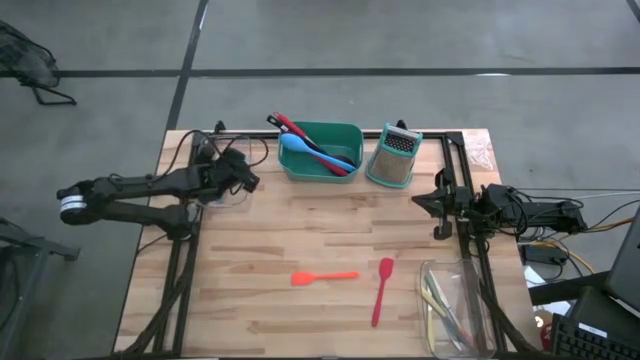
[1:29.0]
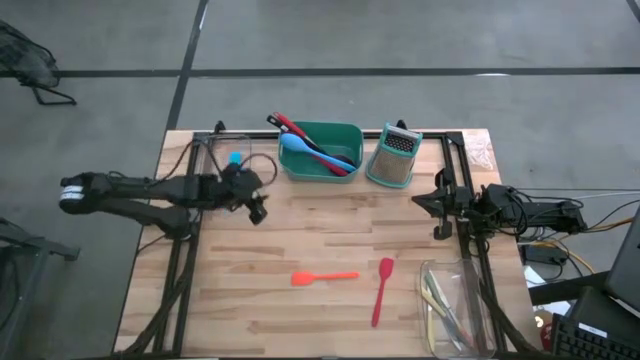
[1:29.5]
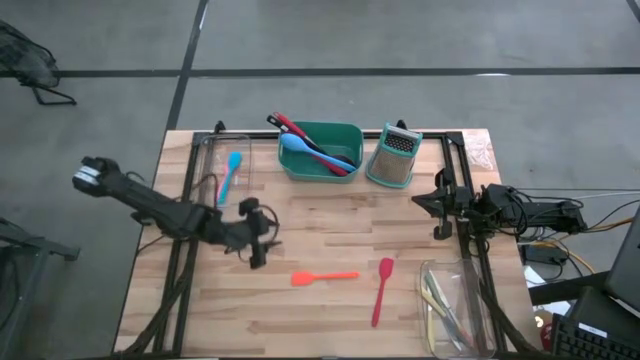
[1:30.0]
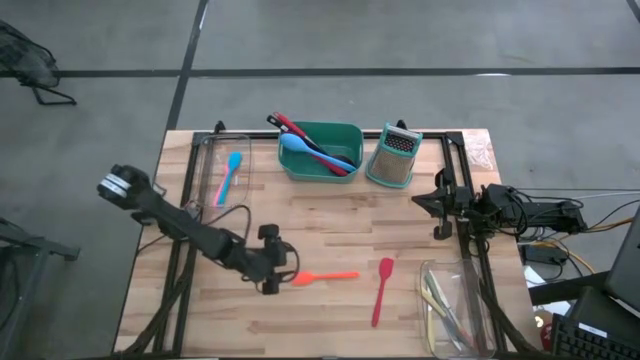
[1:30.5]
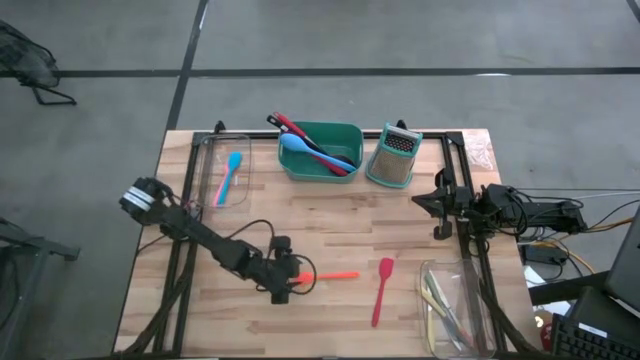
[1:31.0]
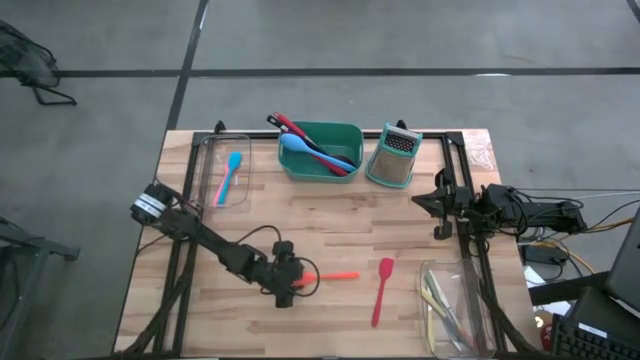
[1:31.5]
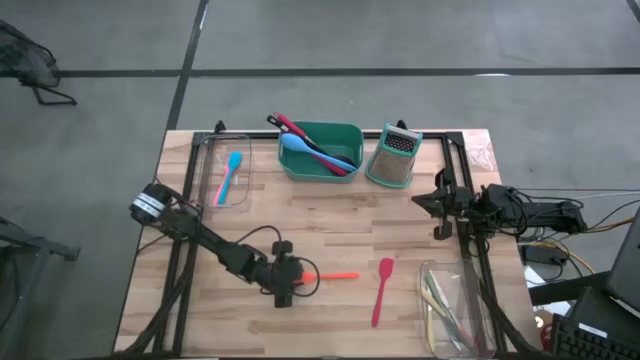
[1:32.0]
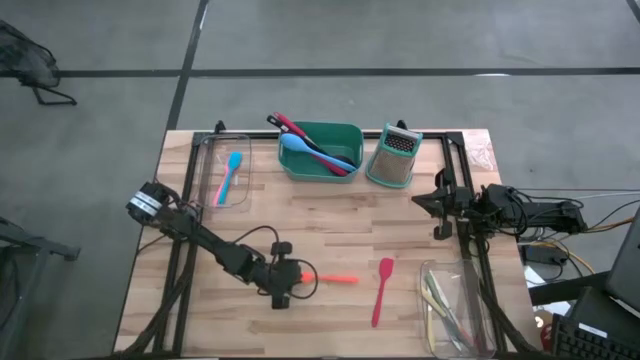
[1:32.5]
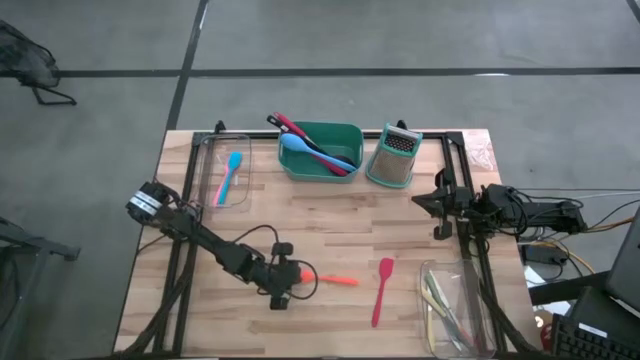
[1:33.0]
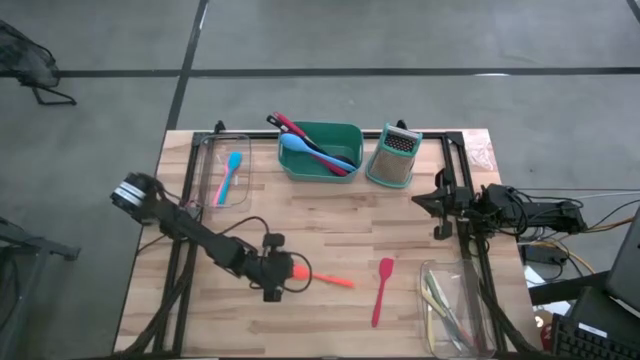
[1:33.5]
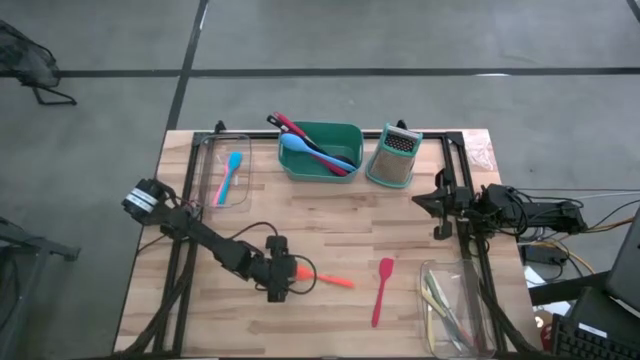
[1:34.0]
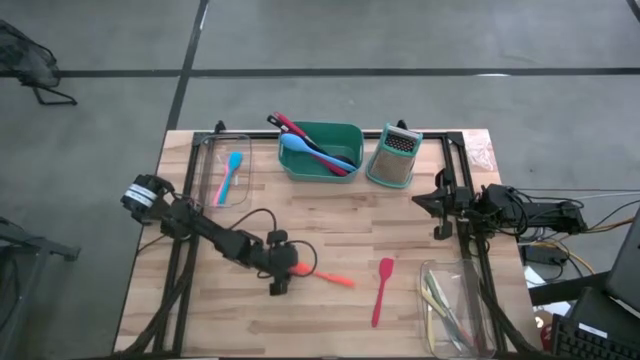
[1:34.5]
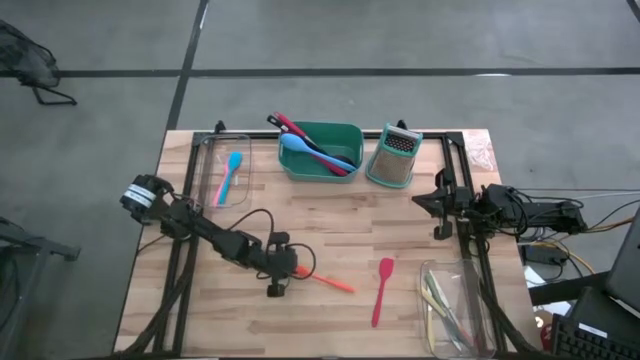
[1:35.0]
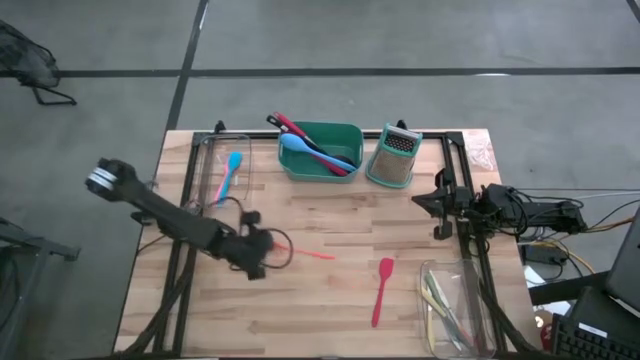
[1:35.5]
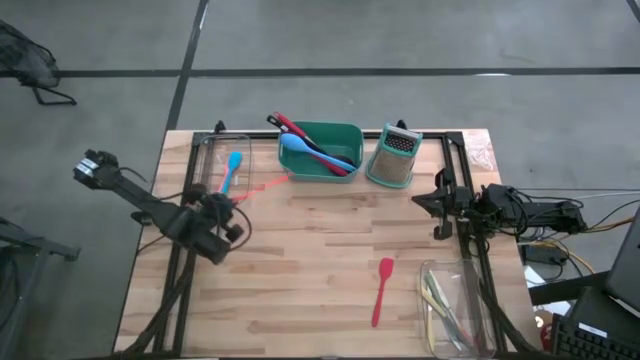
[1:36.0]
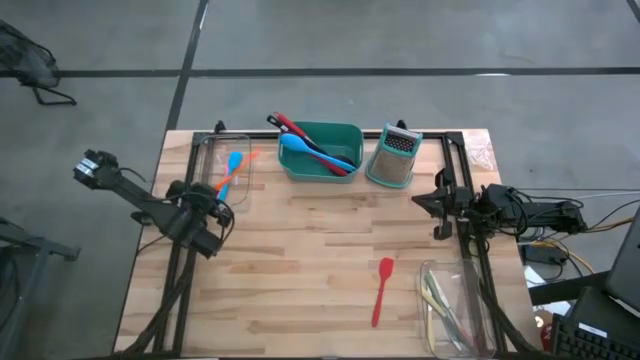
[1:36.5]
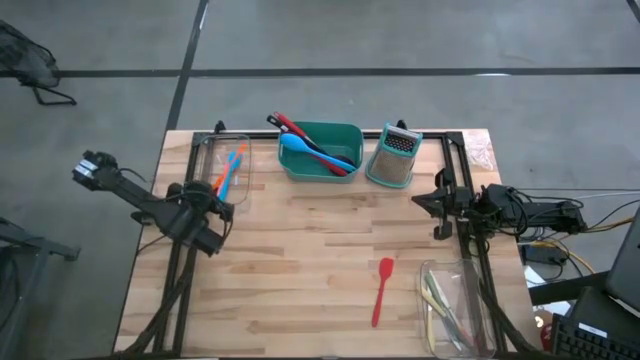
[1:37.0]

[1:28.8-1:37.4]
Task: Pick & Place Kitchen Items
Put the orange spatula into the left transparent bin

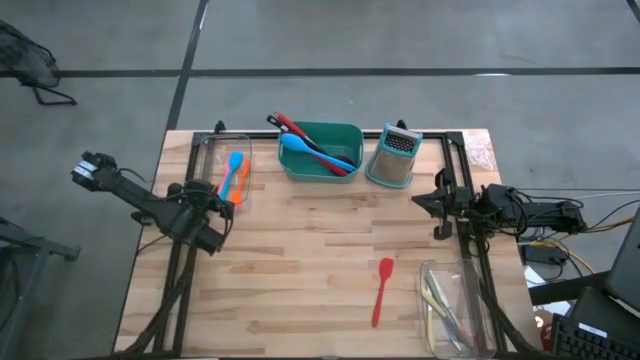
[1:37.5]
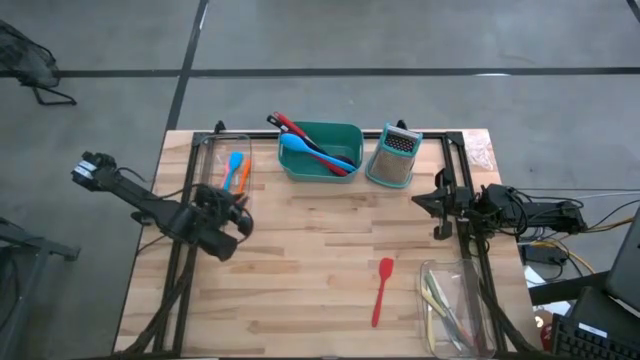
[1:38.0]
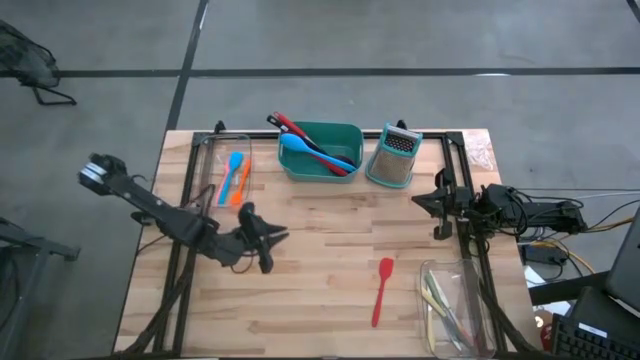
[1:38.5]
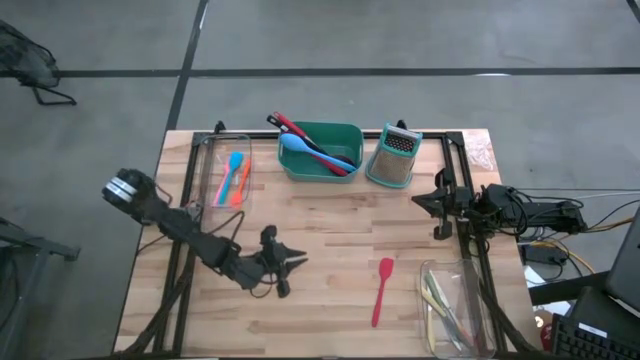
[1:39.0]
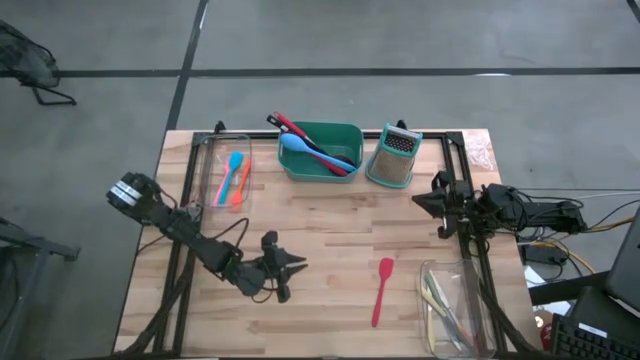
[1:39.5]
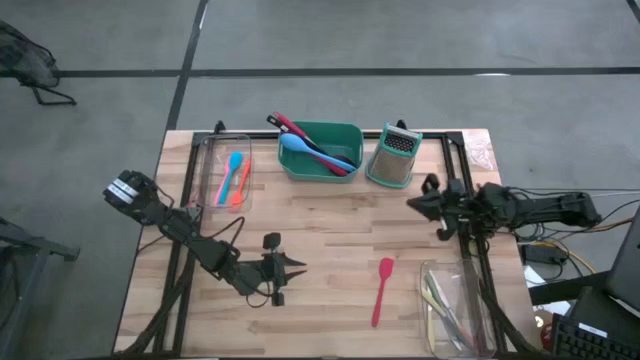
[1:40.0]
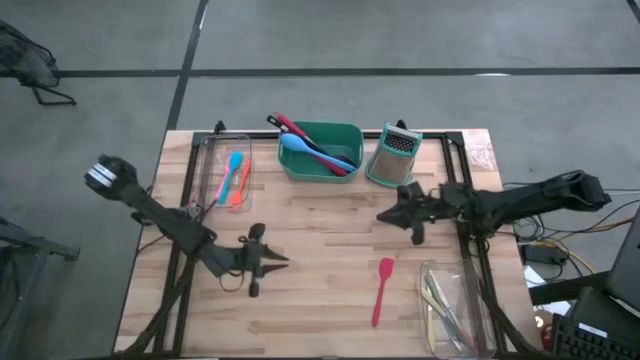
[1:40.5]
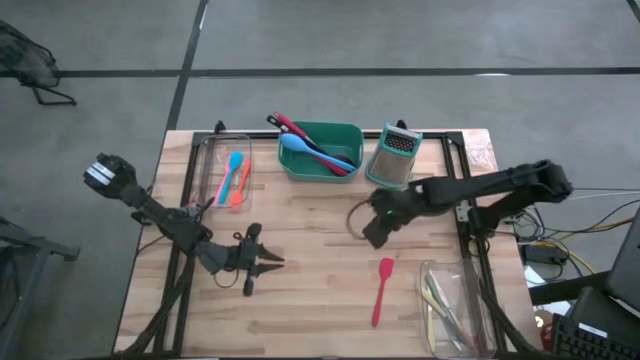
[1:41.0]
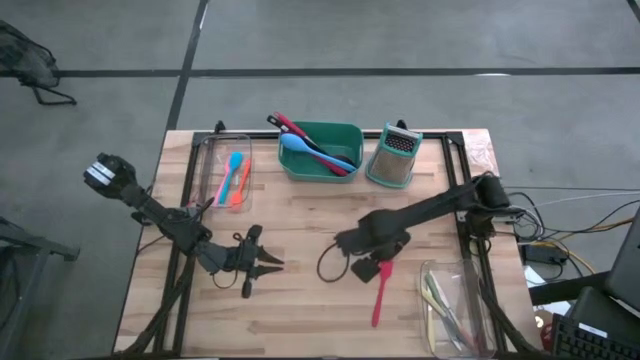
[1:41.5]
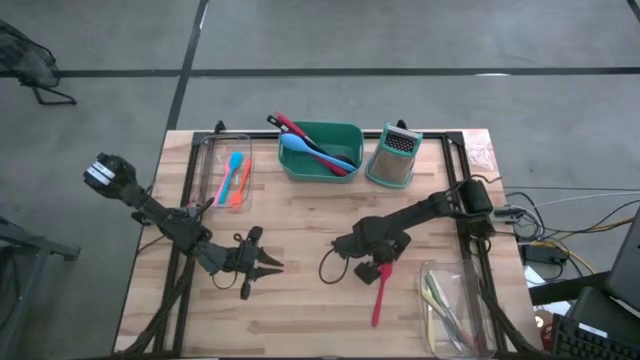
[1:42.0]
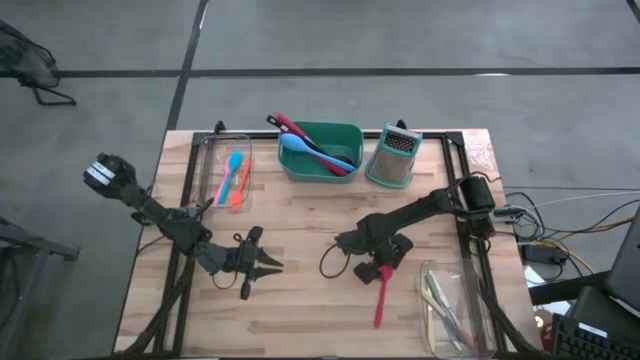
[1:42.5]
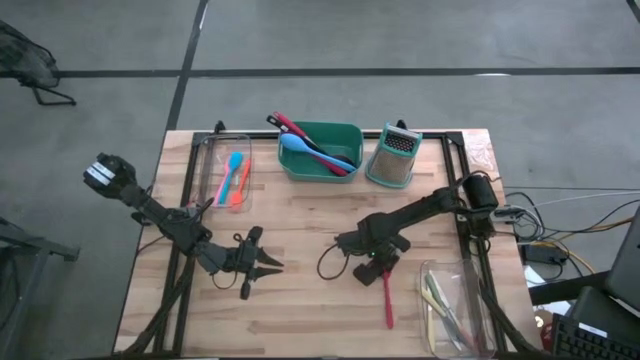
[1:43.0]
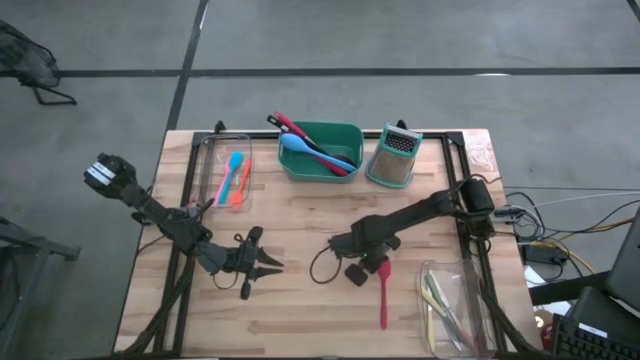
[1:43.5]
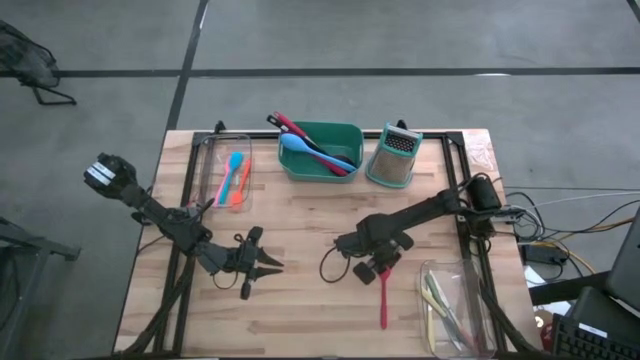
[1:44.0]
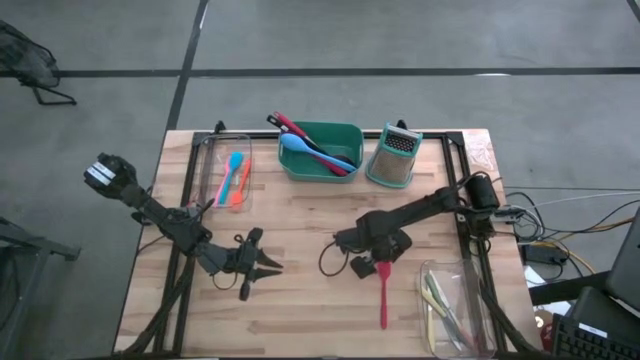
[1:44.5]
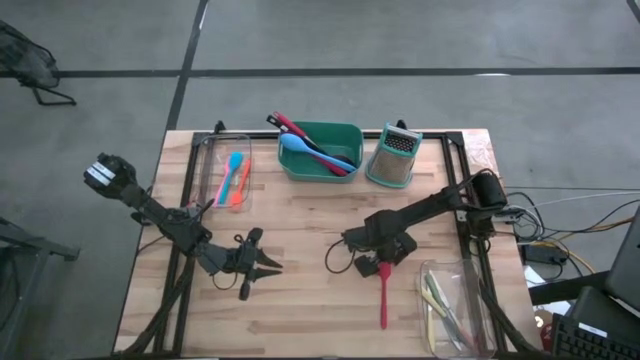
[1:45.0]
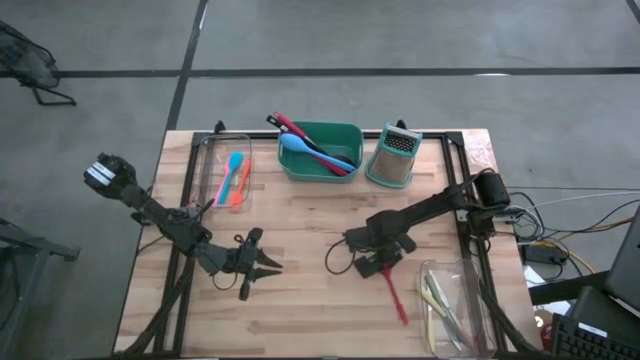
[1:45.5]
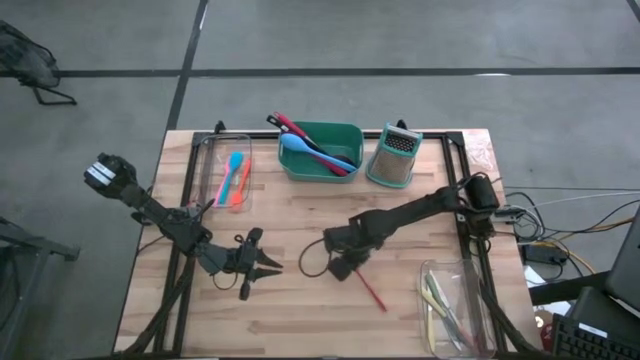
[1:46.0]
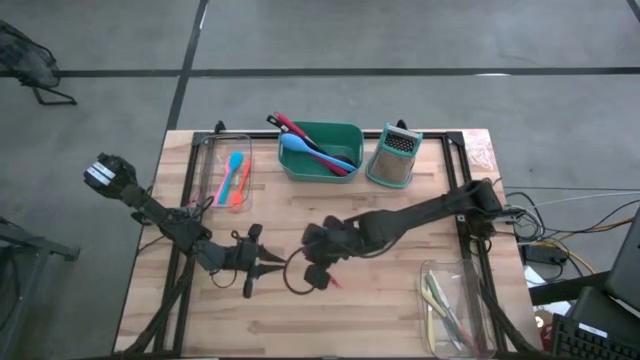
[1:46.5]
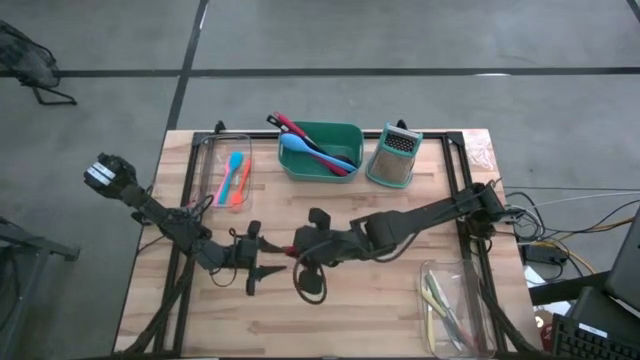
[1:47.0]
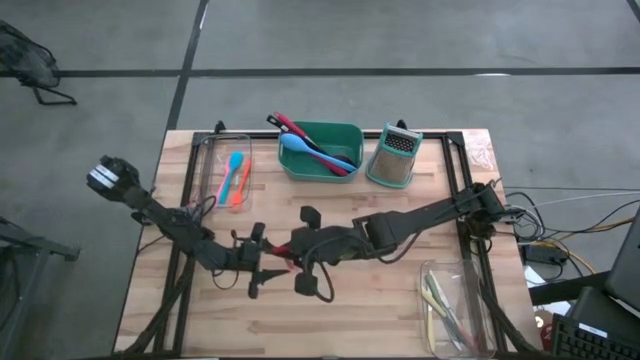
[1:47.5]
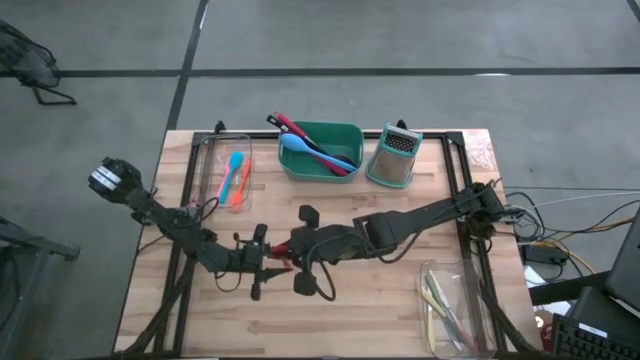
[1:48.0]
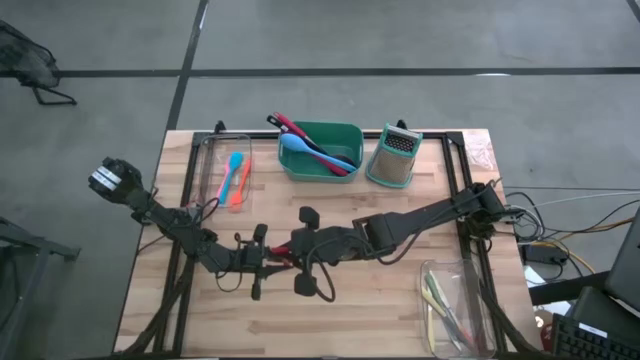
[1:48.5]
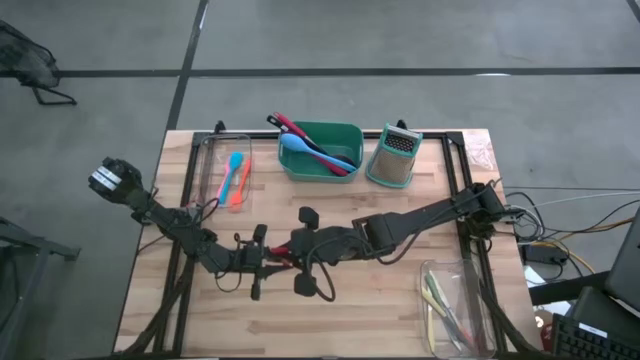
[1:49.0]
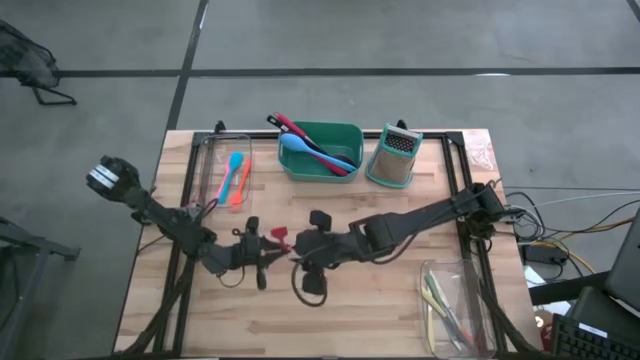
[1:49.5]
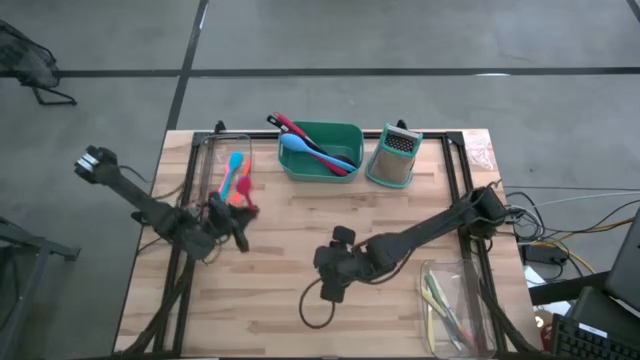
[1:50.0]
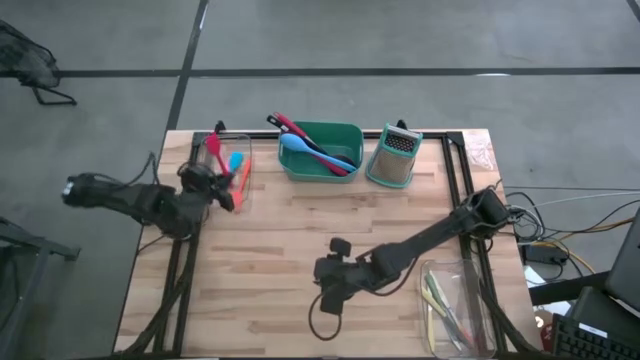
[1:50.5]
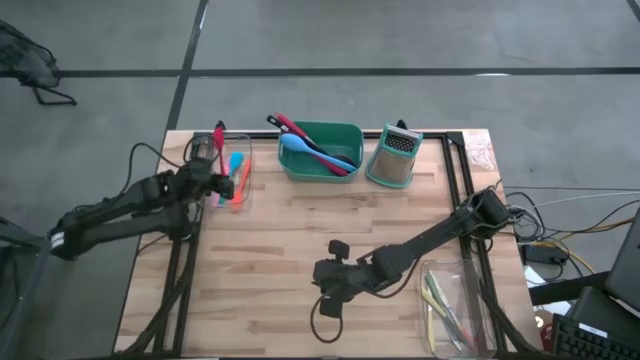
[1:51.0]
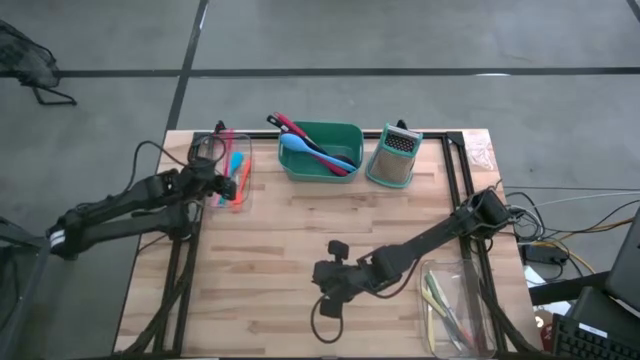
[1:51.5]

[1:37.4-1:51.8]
Put the red spatula into the left transparent bin
